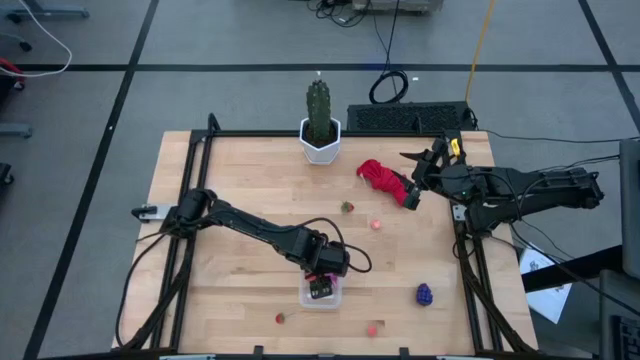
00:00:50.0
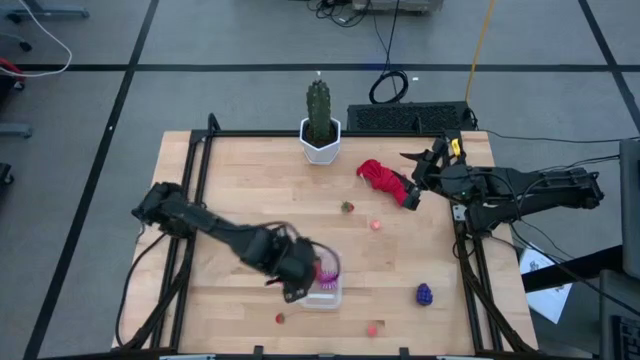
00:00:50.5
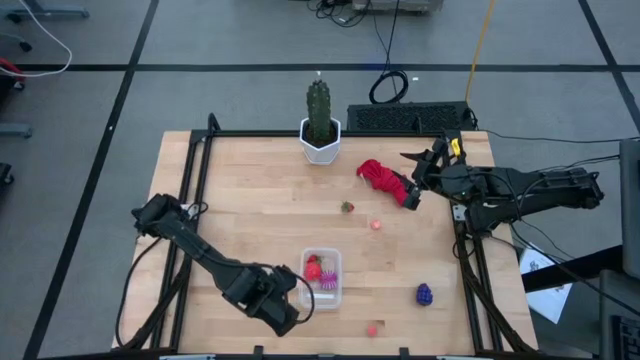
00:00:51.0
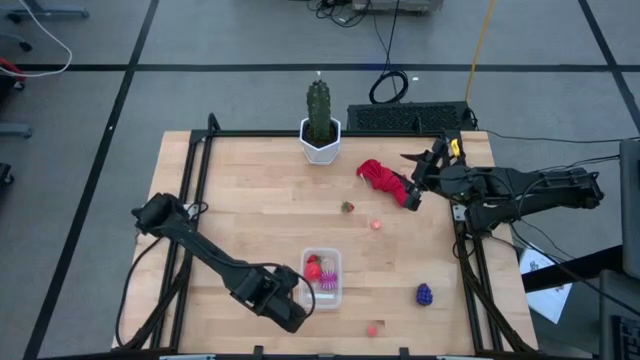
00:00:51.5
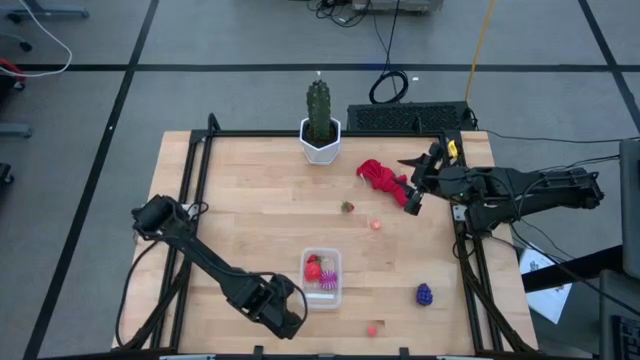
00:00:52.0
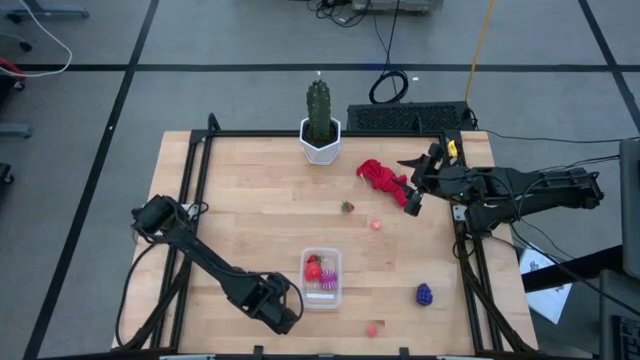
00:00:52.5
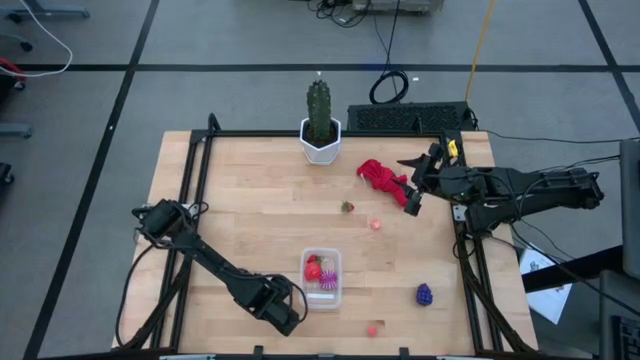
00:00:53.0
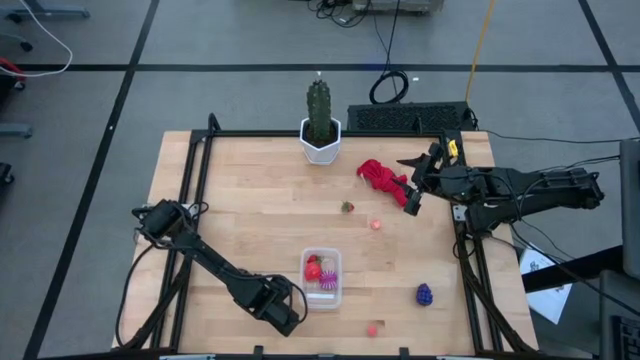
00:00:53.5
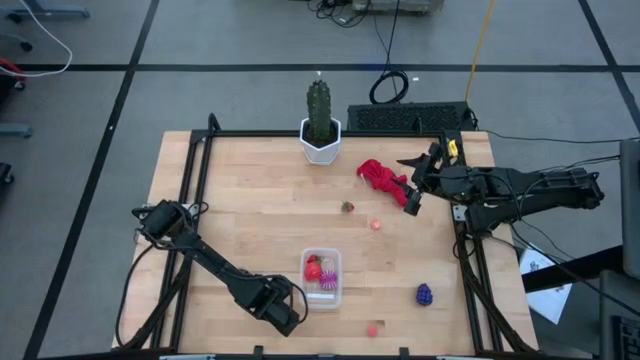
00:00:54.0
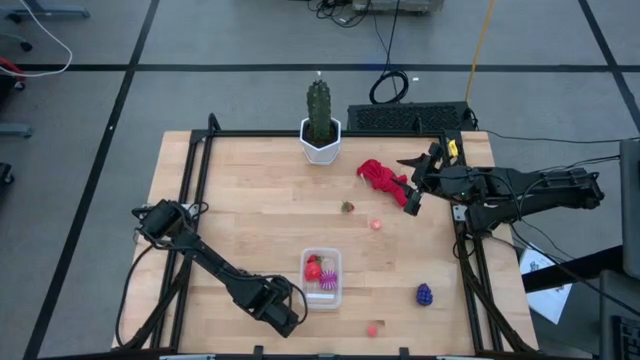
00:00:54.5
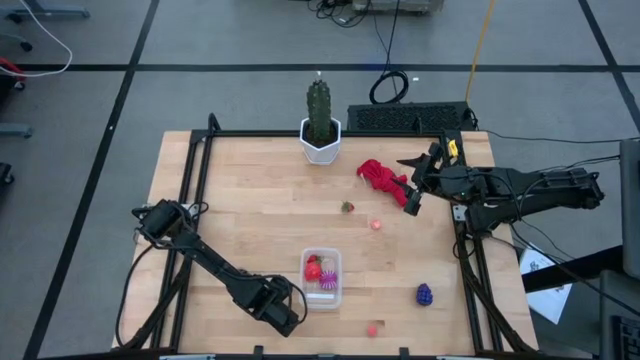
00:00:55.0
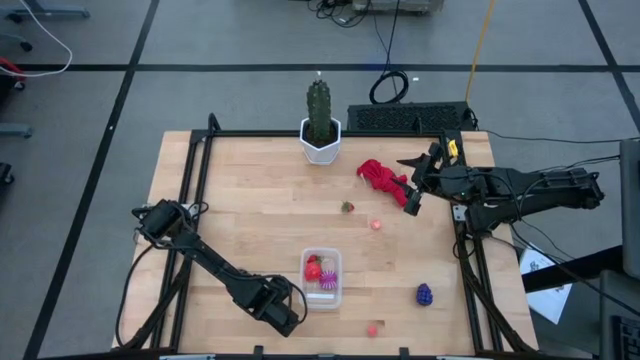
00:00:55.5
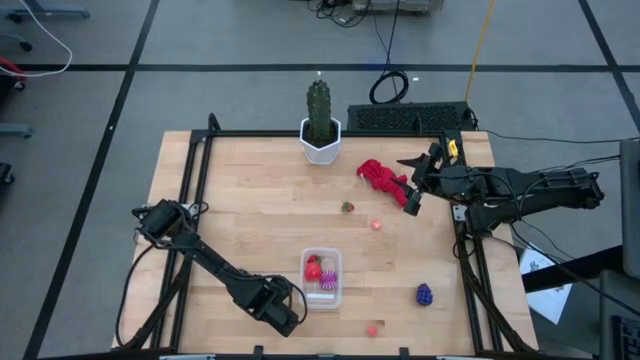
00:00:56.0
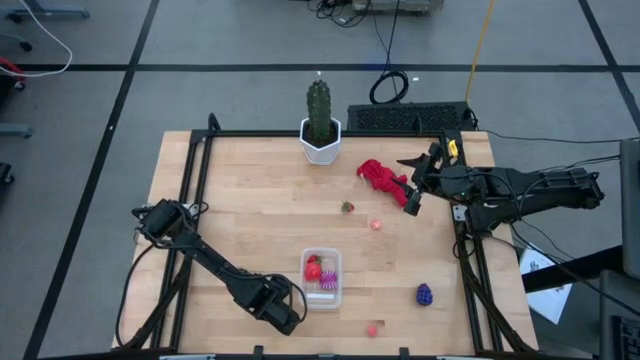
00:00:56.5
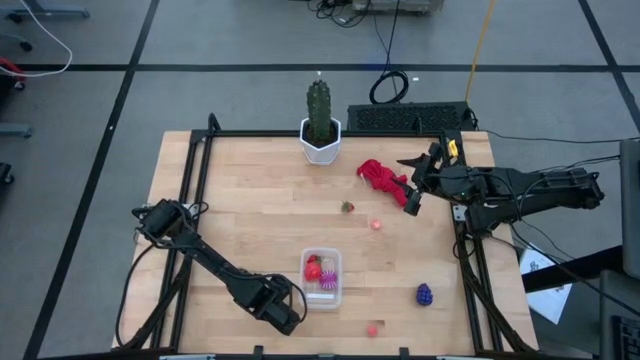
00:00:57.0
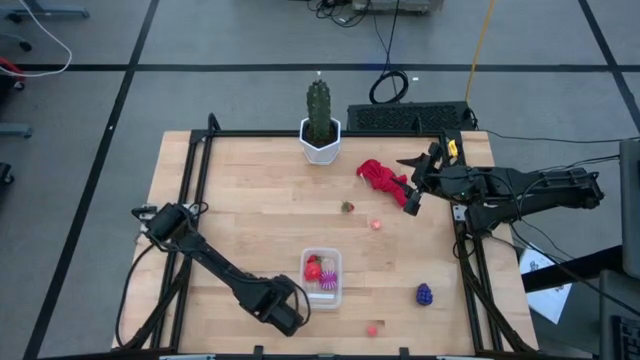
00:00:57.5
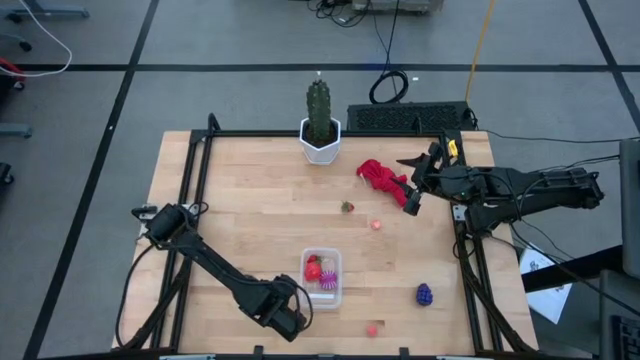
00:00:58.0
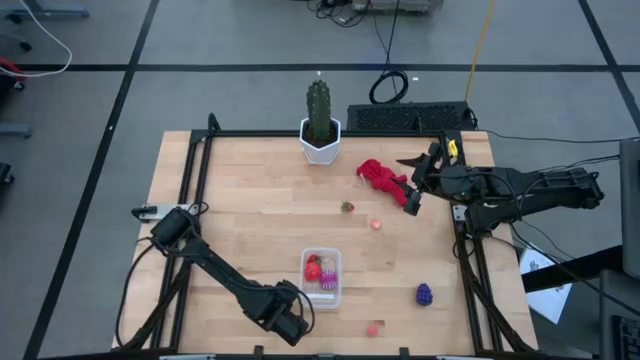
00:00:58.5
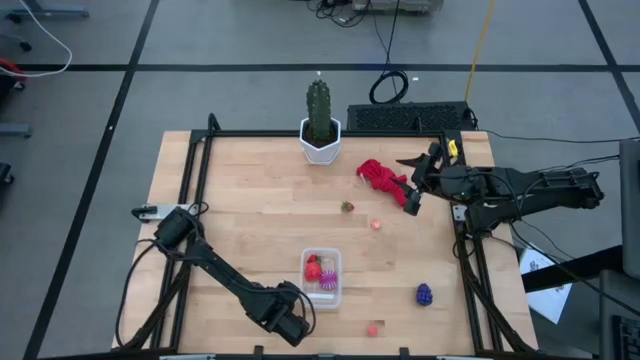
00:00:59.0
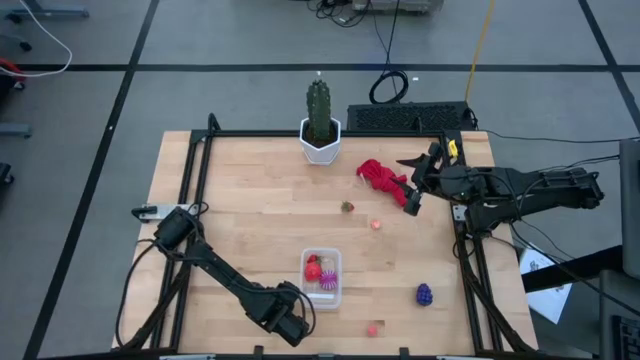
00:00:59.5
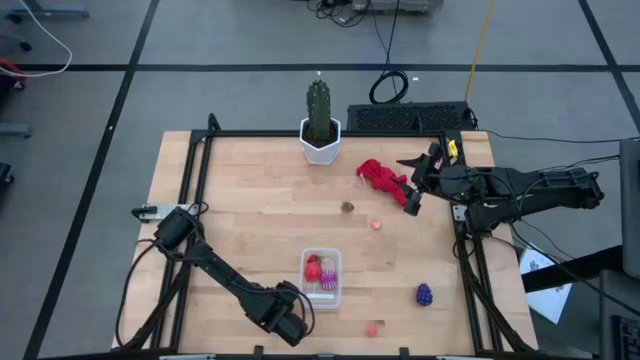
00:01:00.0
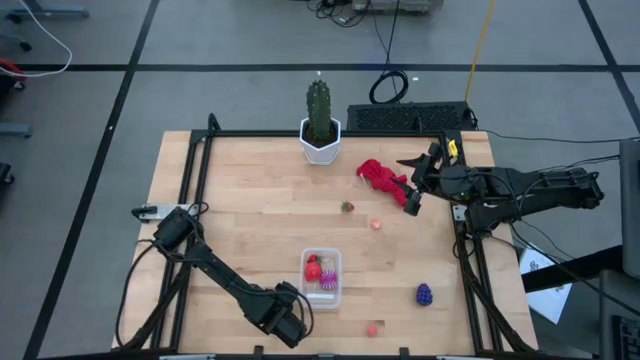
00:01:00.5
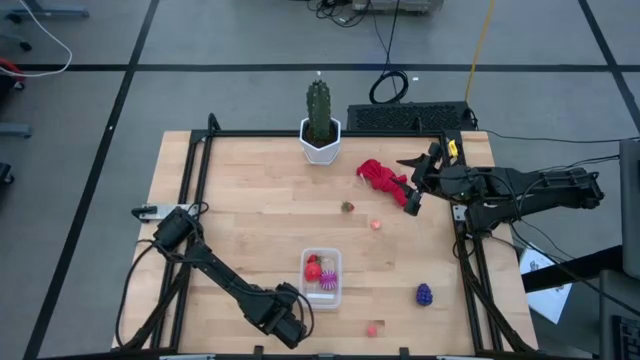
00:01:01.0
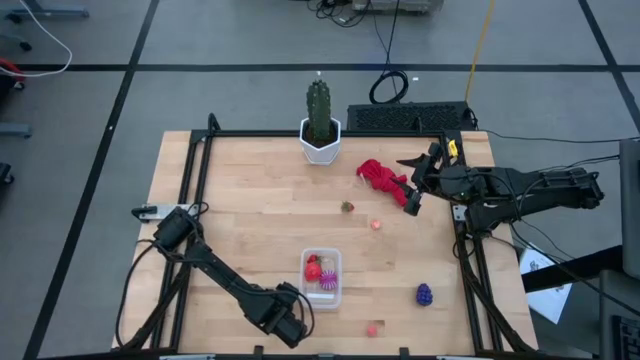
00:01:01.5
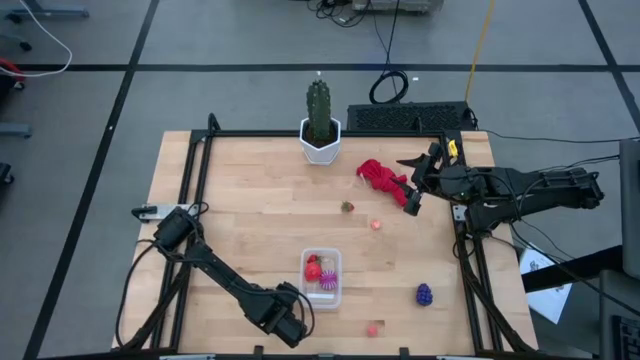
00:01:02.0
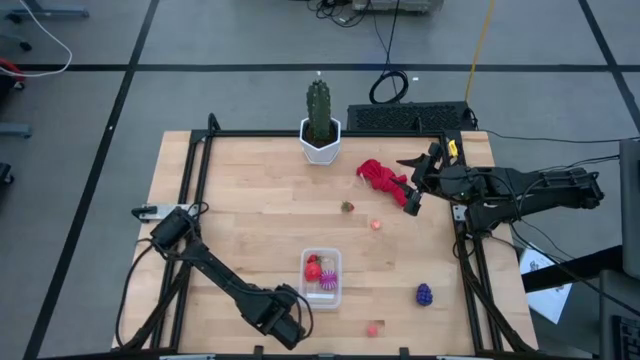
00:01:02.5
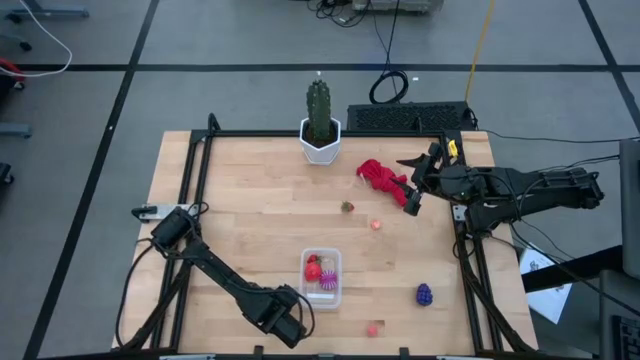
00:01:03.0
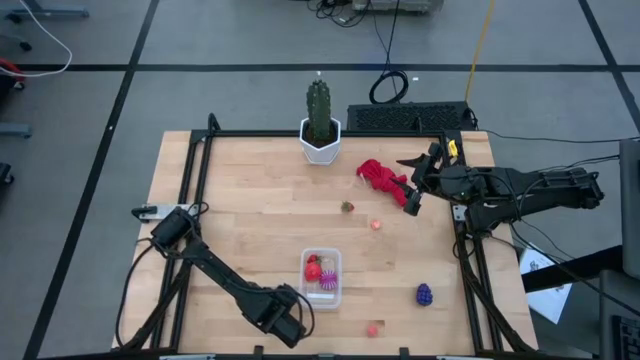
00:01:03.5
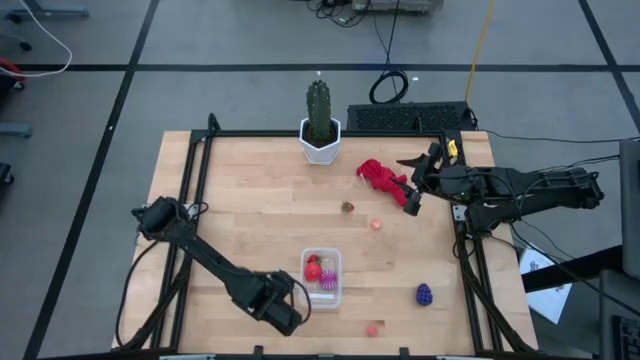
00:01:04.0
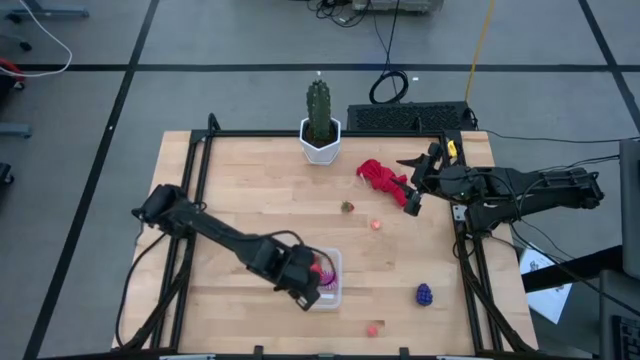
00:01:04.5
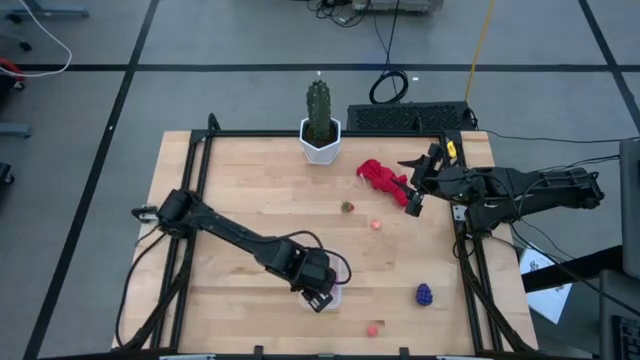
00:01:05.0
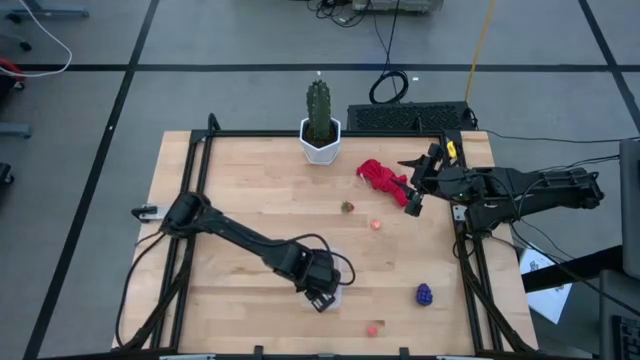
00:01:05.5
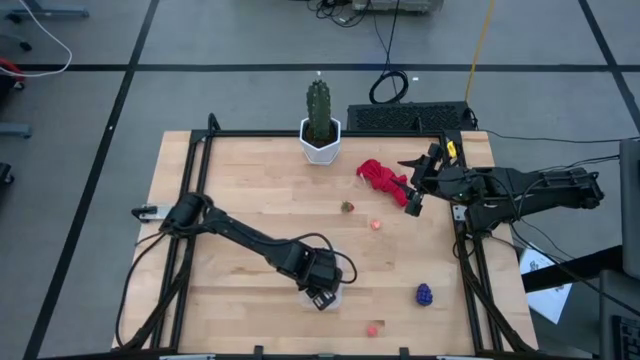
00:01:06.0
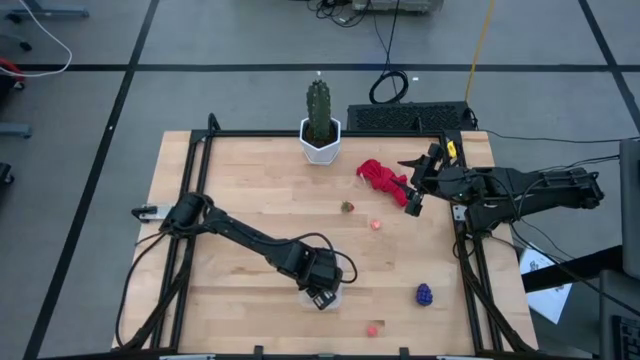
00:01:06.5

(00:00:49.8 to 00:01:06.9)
Task: Pick and placing Produce into tupperware
Put the bottom strawberry into the transparent container

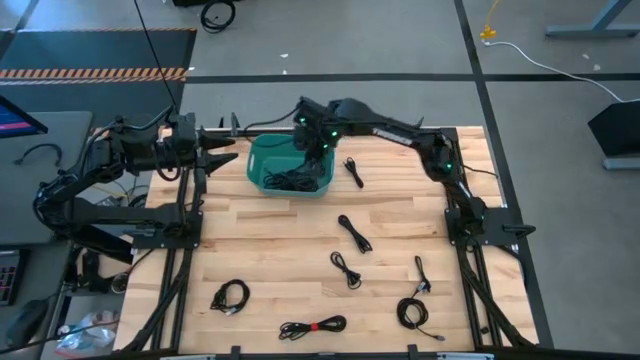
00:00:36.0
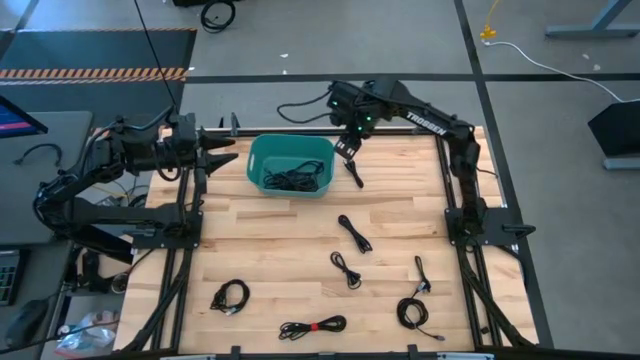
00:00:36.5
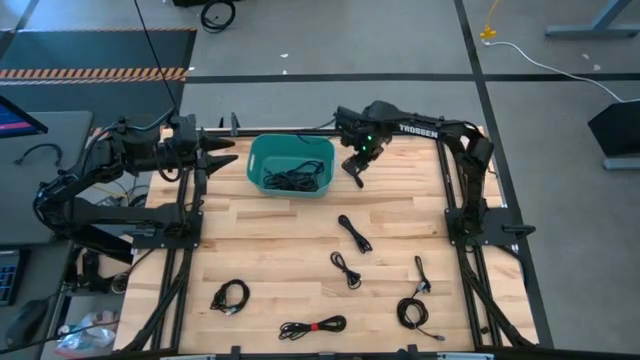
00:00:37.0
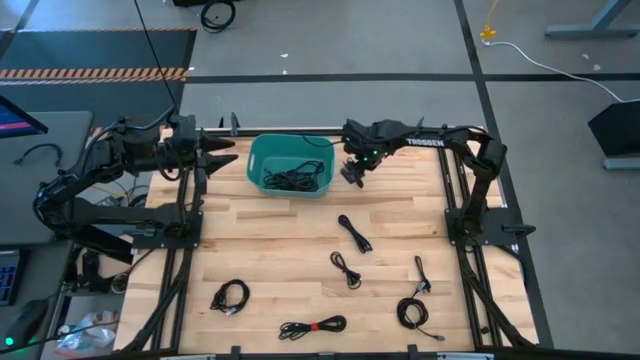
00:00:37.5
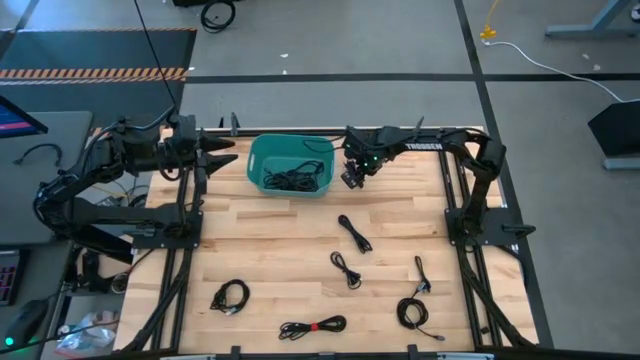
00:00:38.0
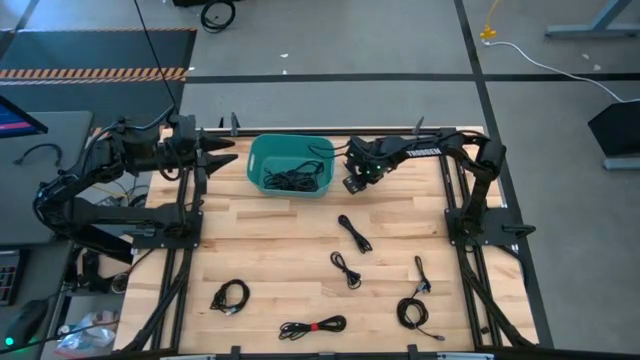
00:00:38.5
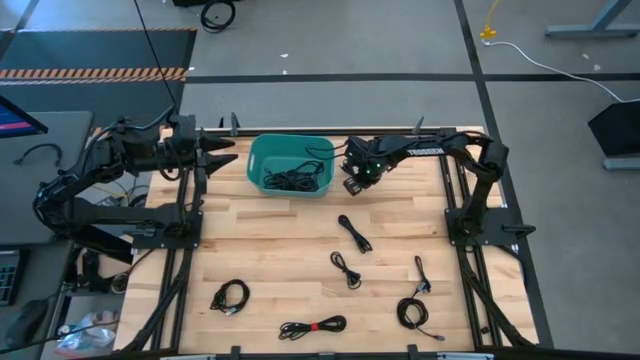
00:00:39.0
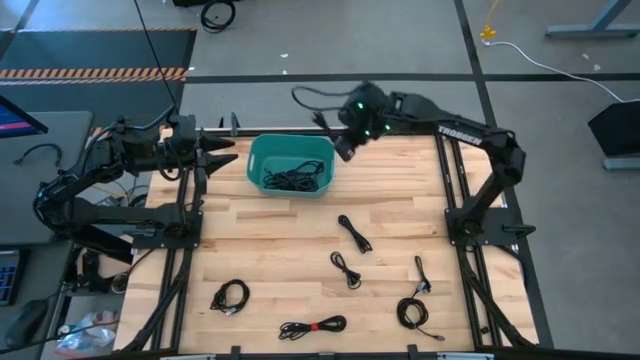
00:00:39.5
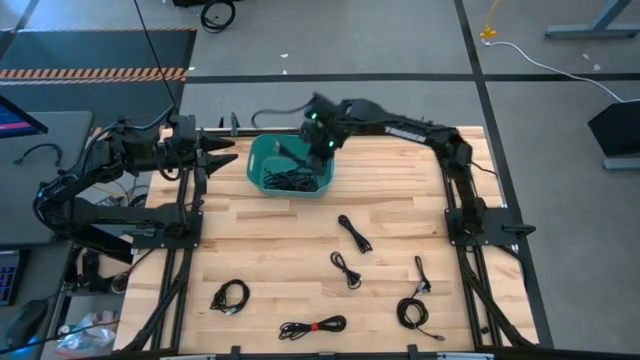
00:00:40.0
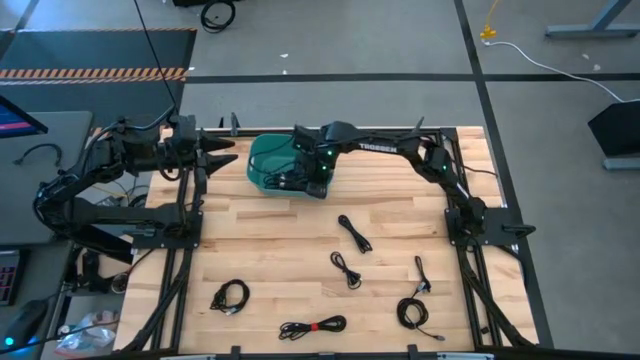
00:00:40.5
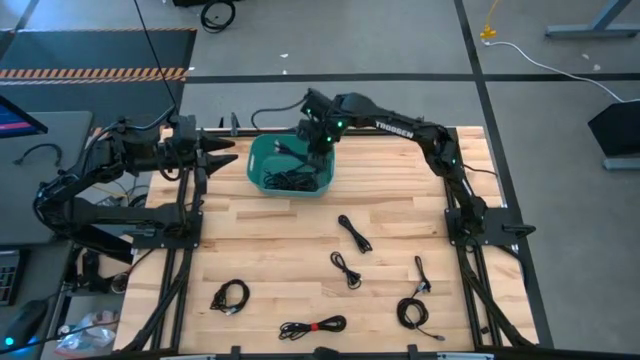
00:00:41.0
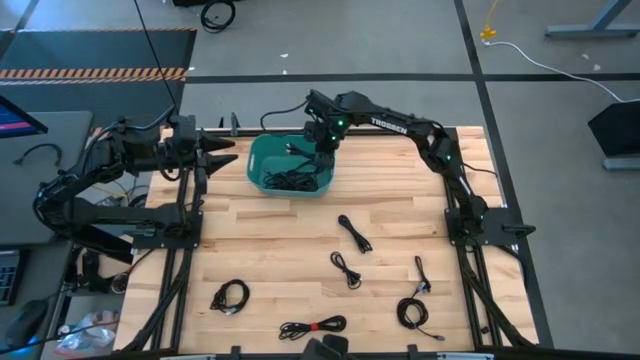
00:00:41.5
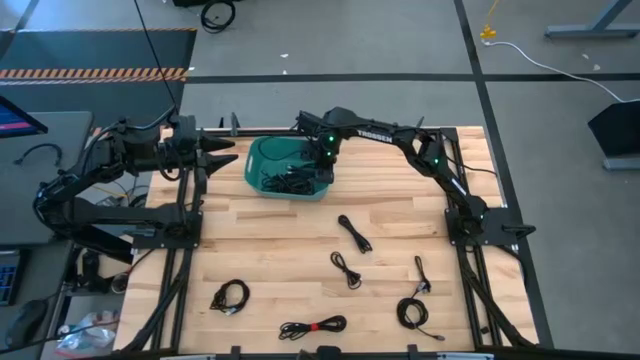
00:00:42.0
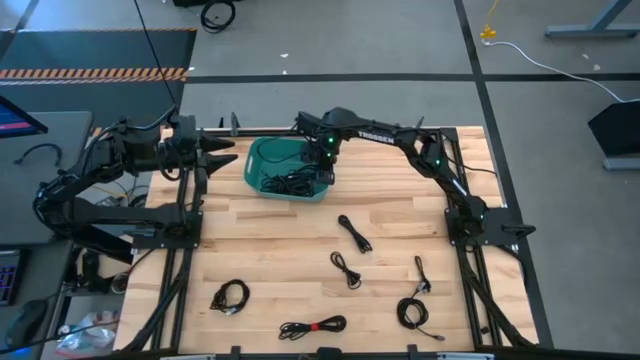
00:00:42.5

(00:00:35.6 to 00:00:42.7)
Task: Pick and place USB-C Cables
Put the black charger cable into the green bin
